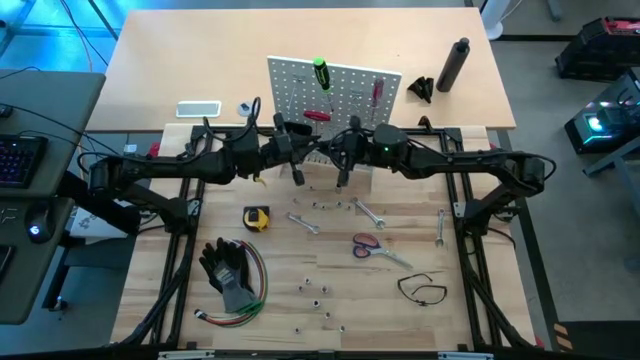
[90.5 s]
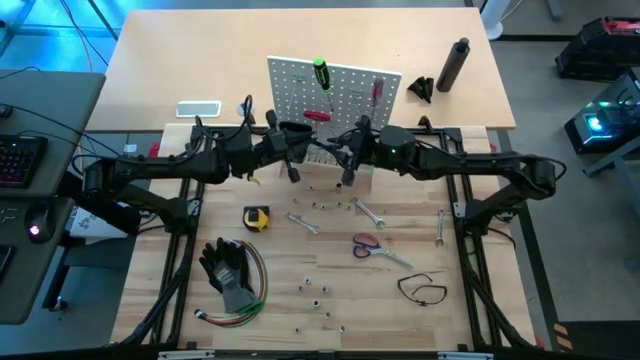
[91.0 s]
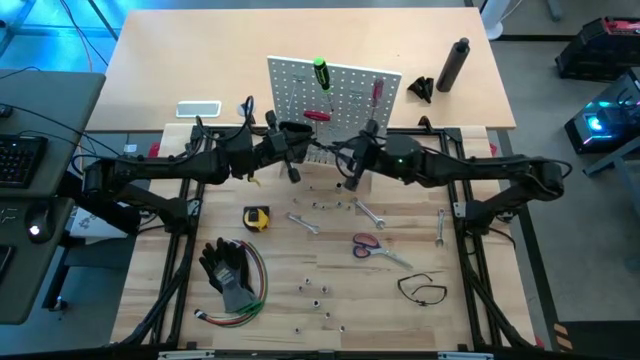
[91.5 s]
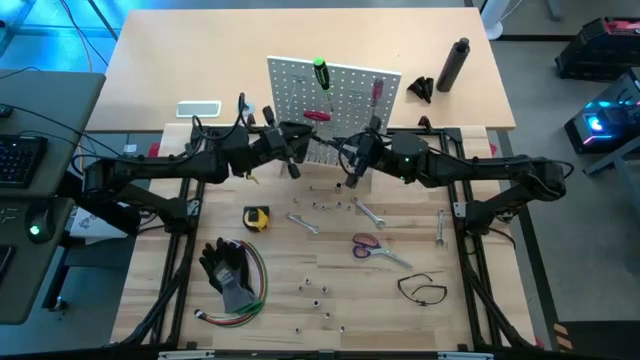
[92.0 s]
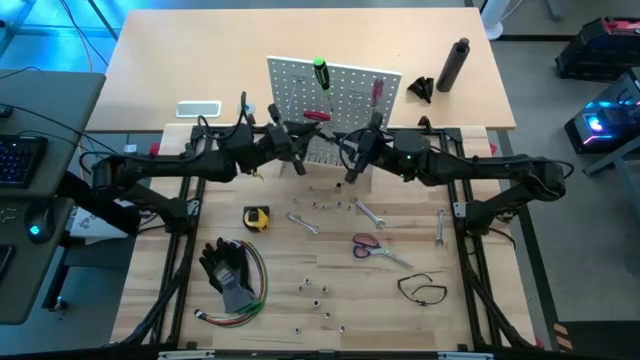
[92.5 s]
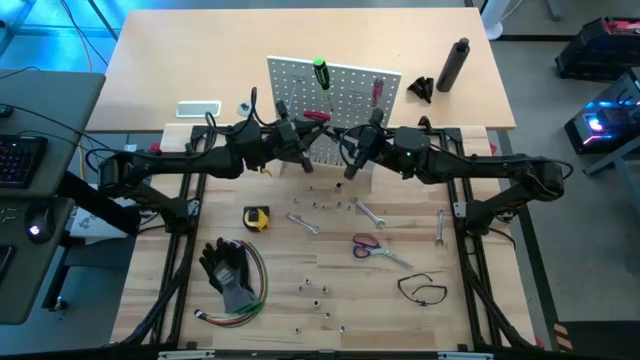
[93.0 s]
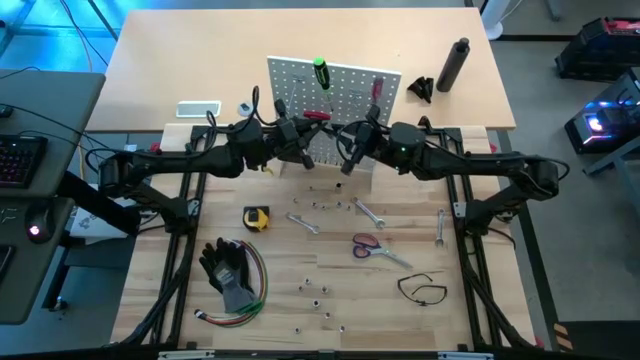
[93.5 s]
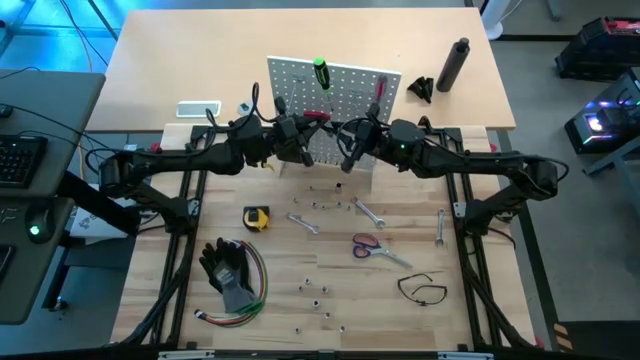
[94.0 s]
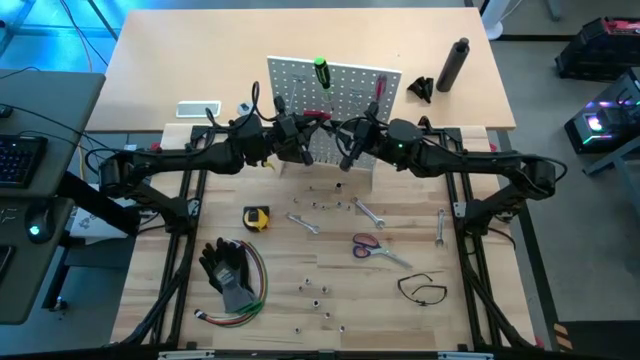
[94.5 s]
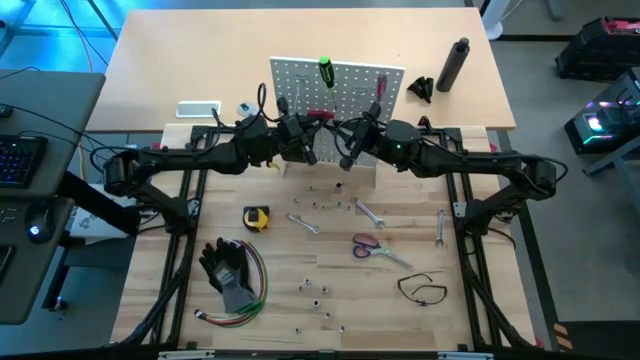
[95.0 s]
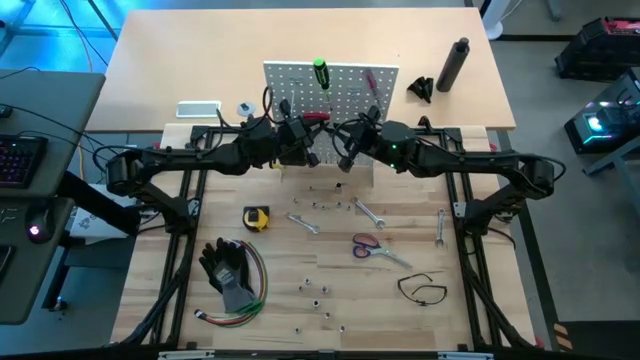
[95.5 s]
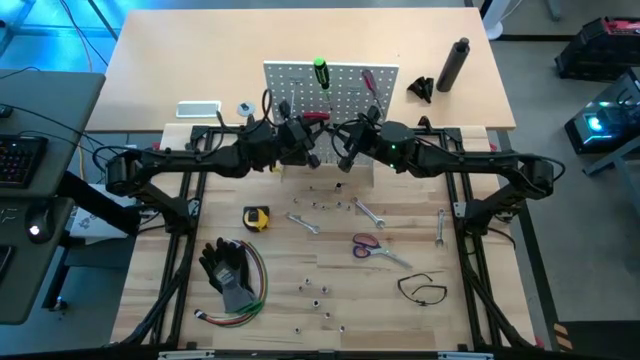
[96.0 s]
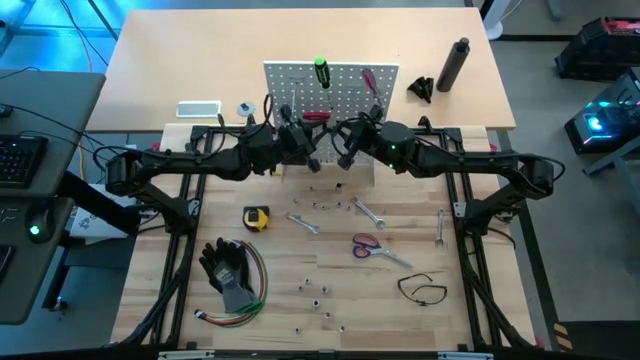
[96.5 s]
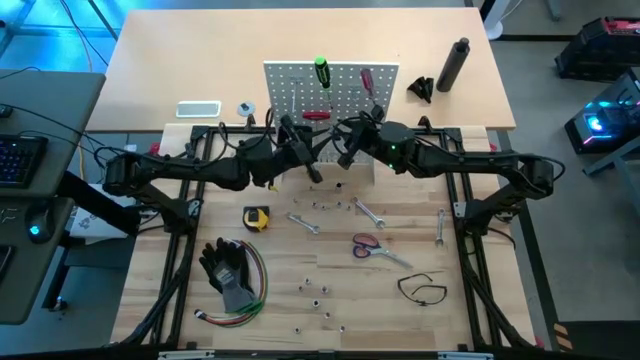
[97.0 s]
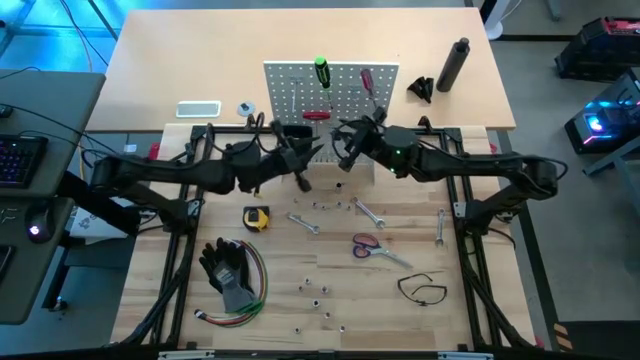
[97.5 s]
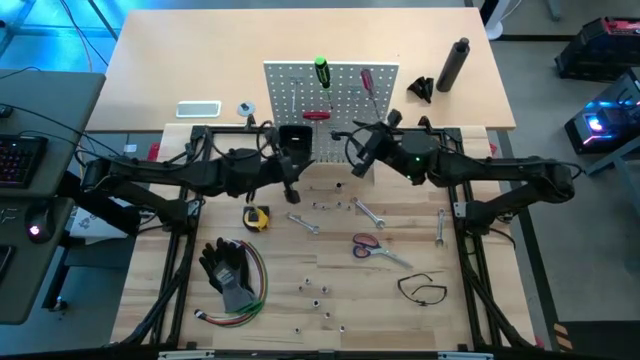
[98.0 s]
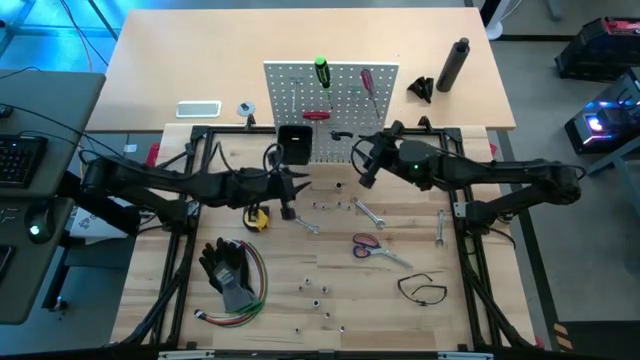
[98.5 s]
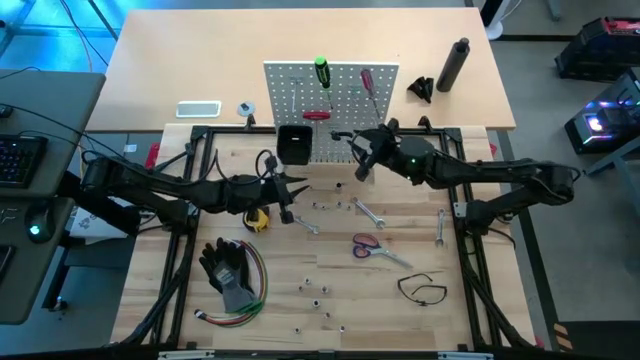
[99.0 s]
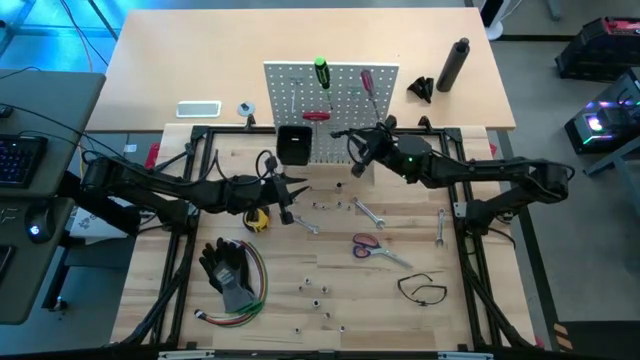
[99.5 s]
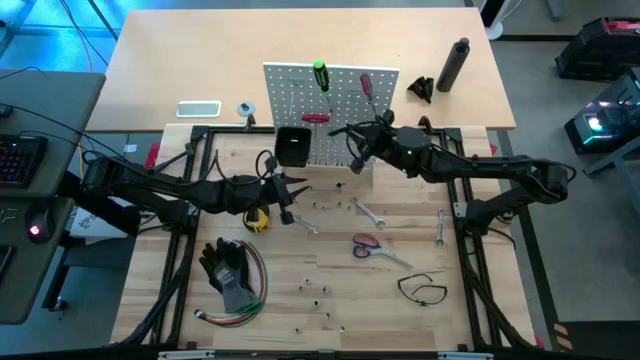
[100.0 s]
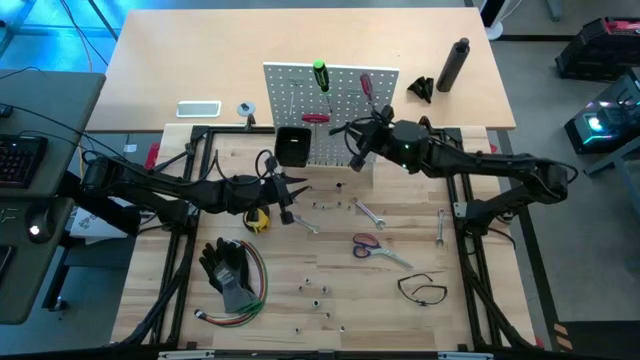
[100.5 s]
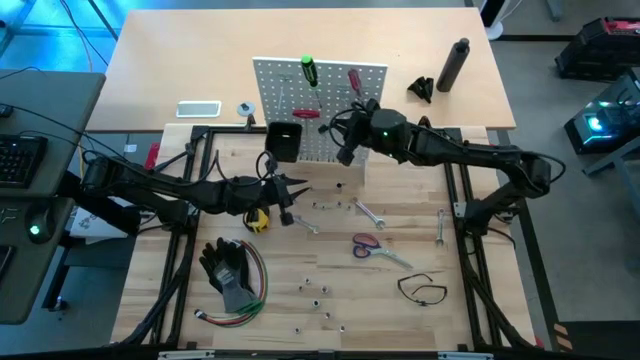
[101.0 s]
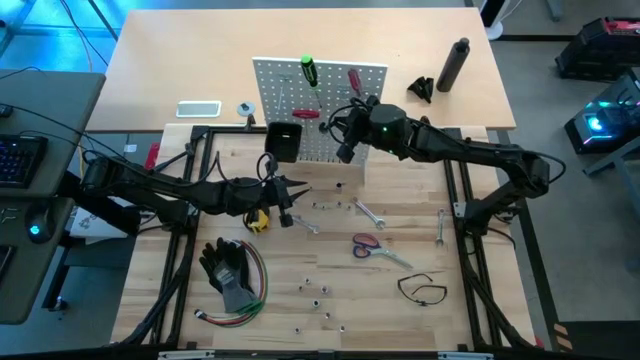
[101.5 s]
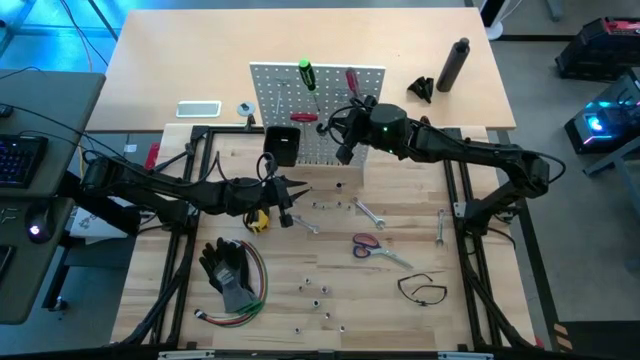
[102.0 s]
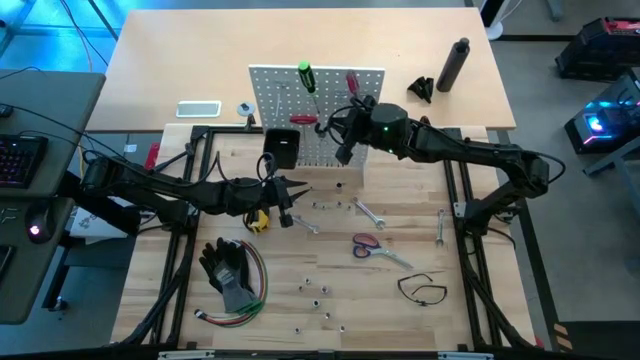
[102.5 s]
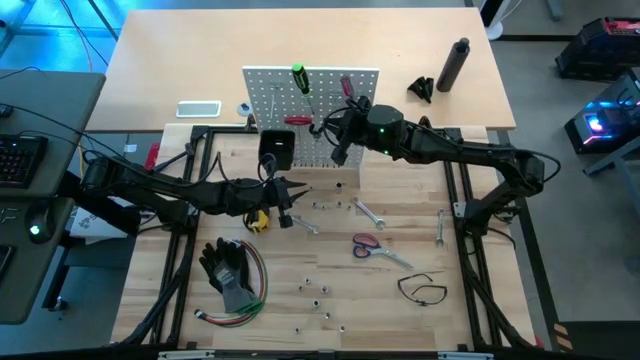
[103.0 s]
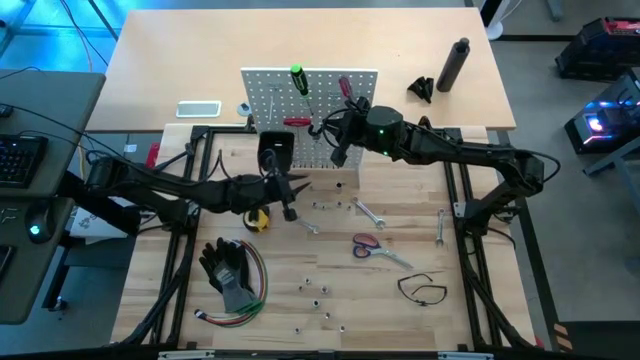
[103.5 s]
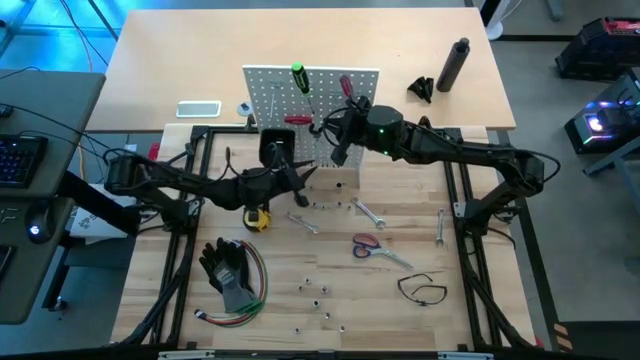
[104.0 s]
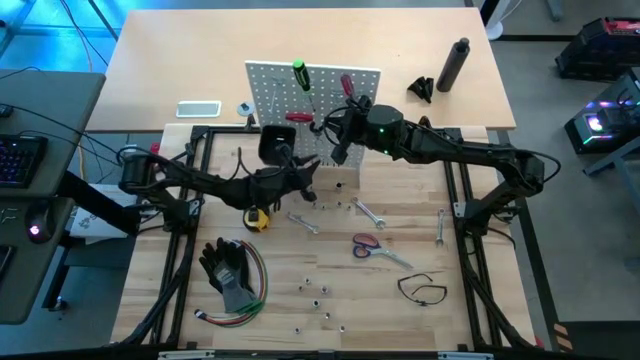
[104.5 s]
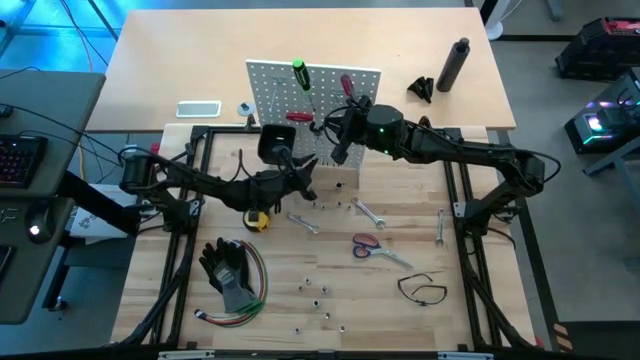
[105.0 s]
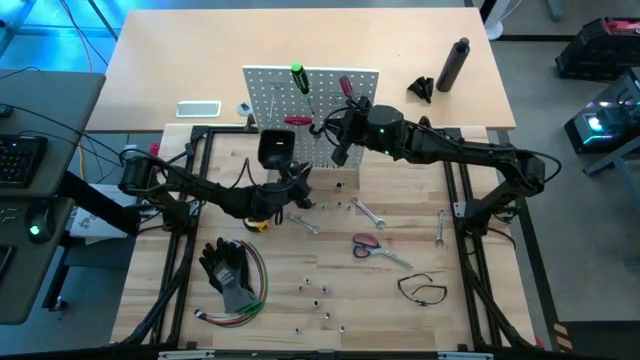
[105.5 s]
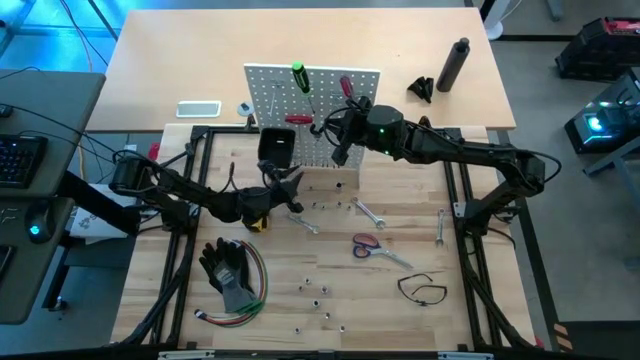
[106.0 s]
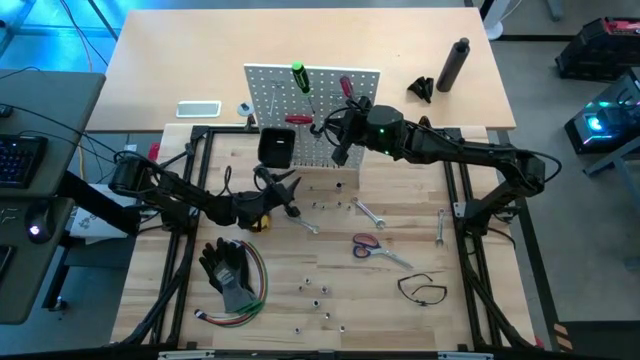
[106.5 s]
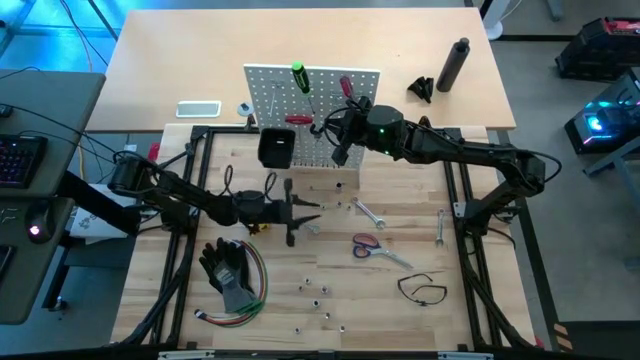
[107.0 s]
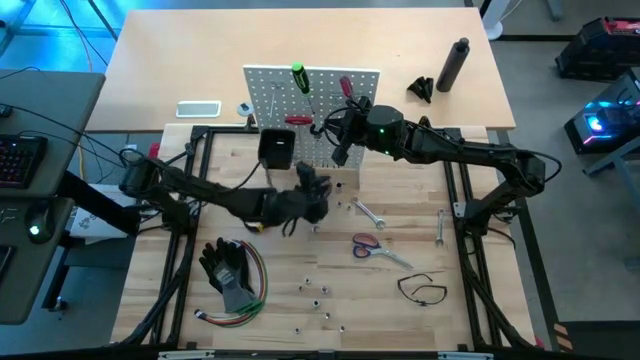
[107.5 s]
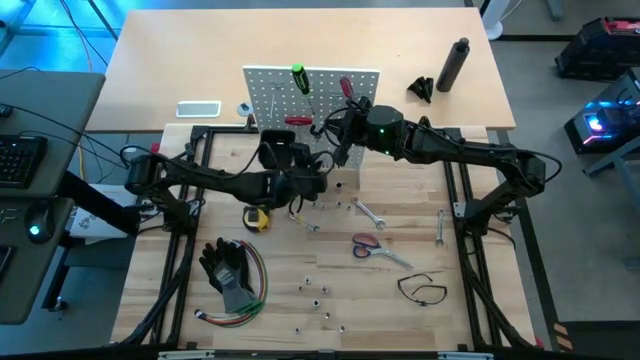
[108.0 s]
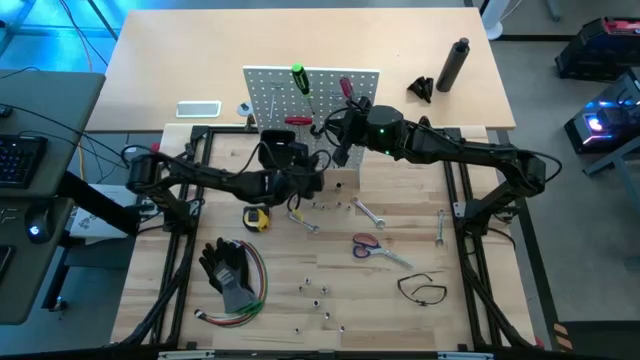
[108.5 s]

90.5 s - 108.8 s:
Task: Hang tools onto peg board
Hang the black pliers on the white peg board

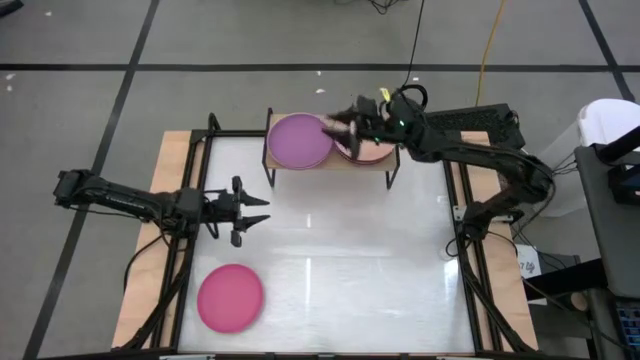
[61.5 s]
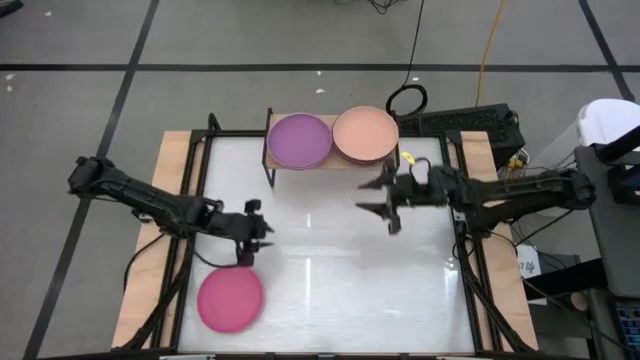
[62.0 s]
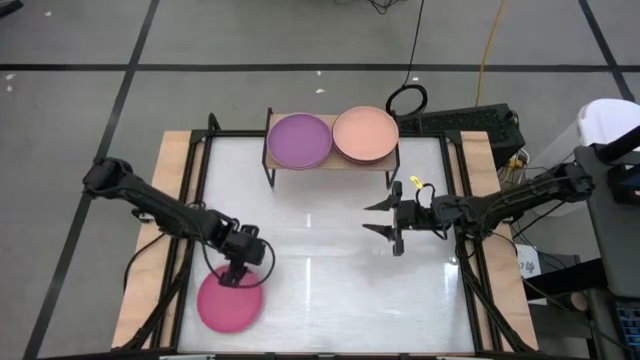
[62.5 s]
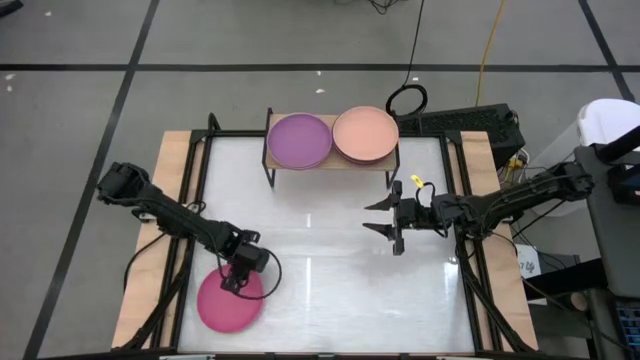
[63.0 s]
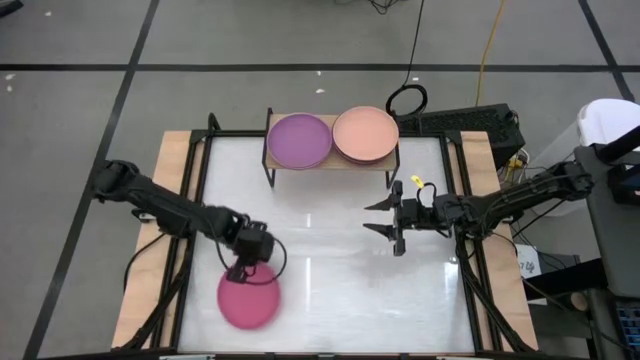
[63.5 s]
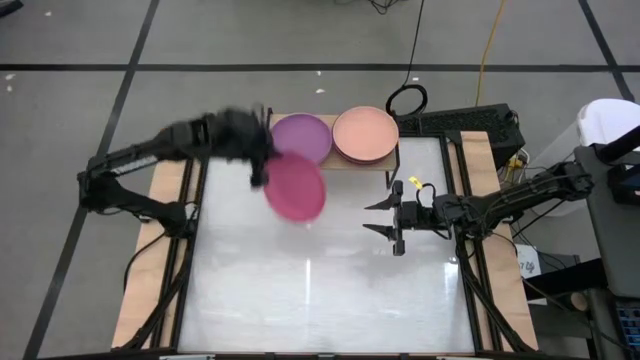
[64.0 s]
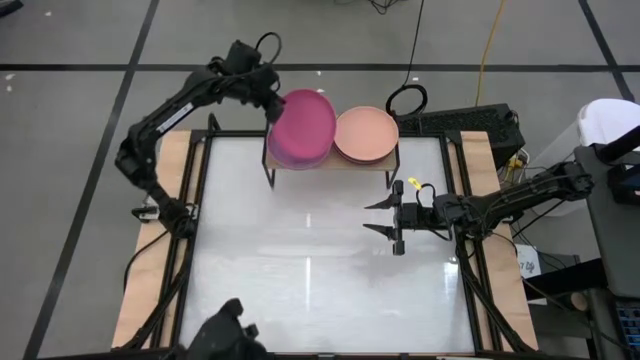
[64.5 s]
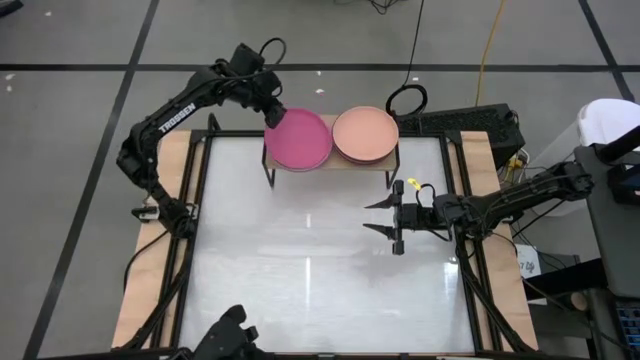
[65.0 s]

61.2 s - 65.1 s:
Task: Place and stack plates onto a shelf
Stack the pink plate on the purple plate on the shelf
